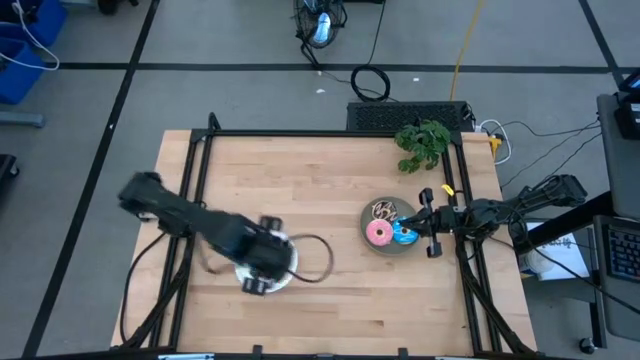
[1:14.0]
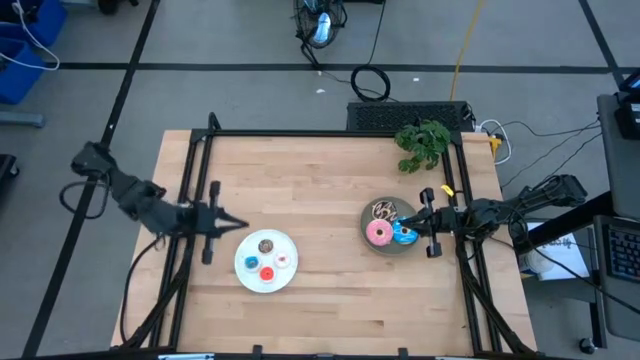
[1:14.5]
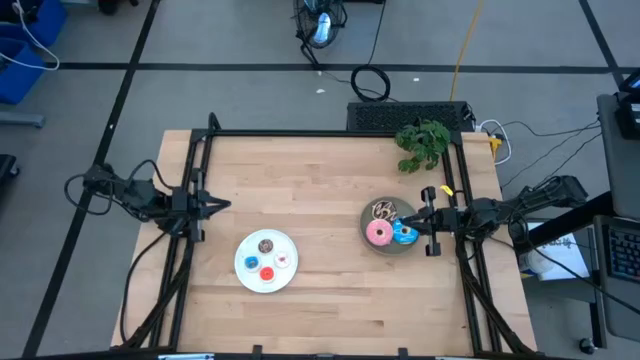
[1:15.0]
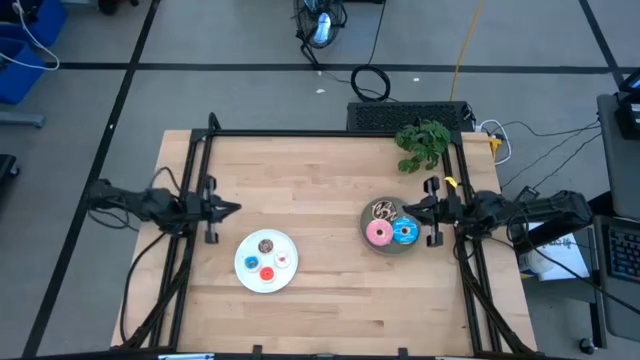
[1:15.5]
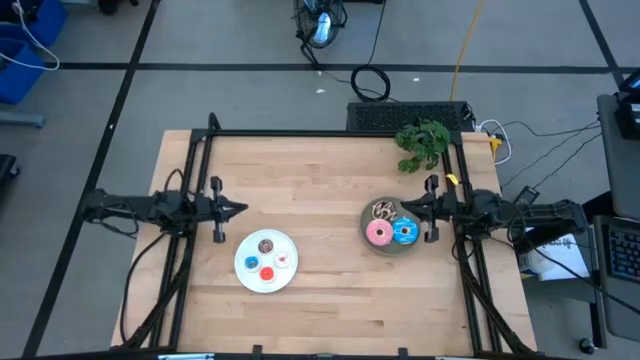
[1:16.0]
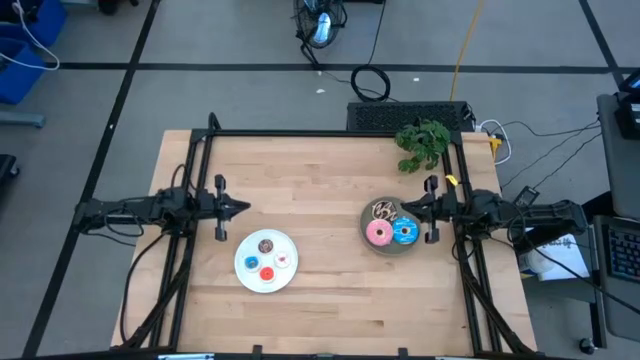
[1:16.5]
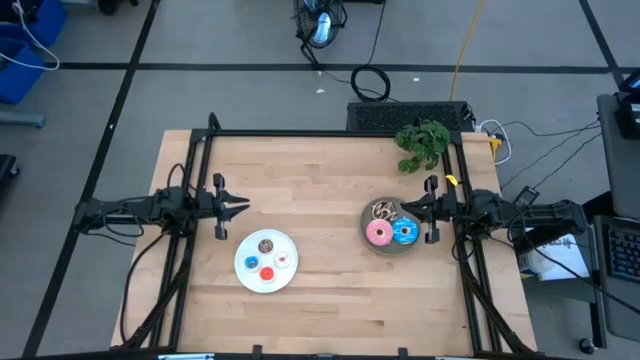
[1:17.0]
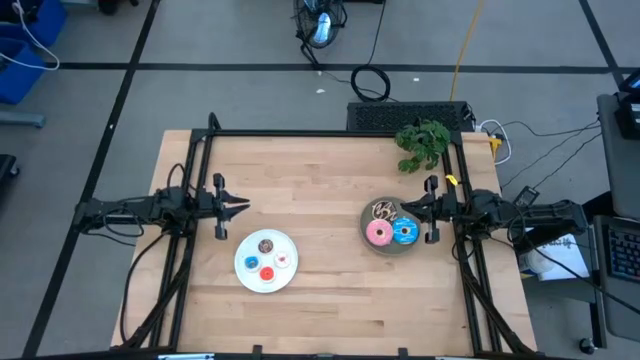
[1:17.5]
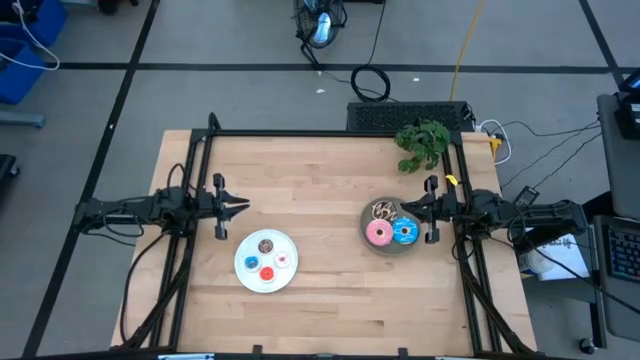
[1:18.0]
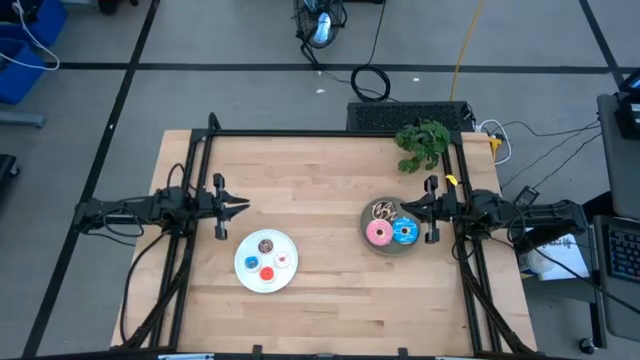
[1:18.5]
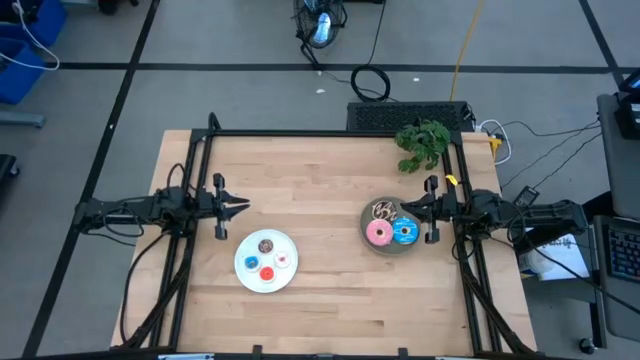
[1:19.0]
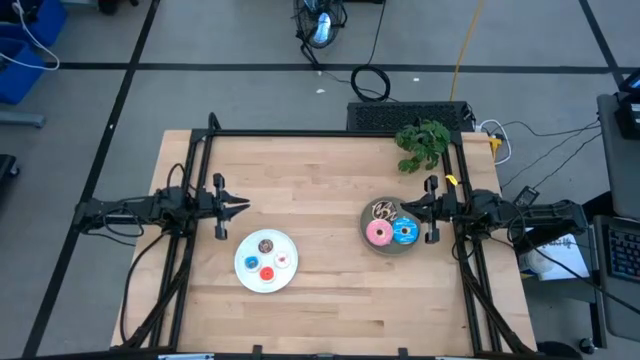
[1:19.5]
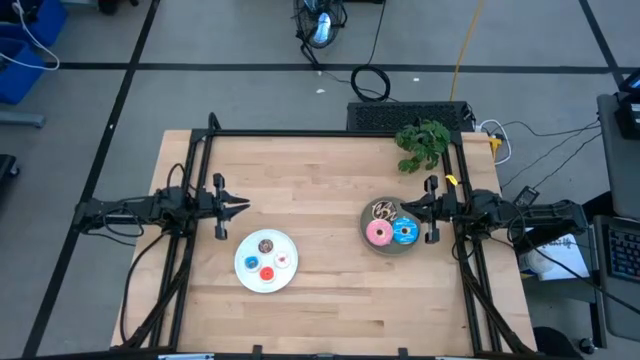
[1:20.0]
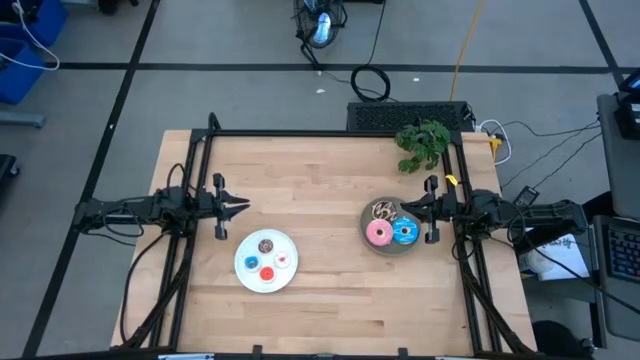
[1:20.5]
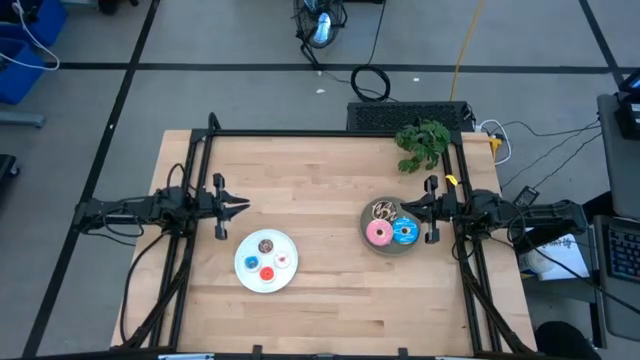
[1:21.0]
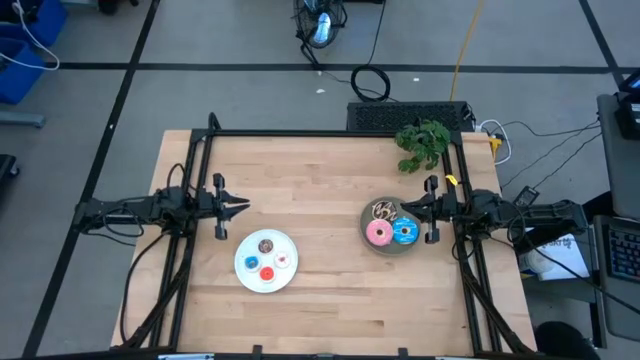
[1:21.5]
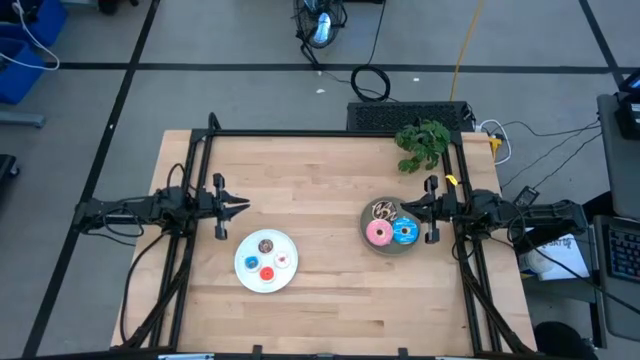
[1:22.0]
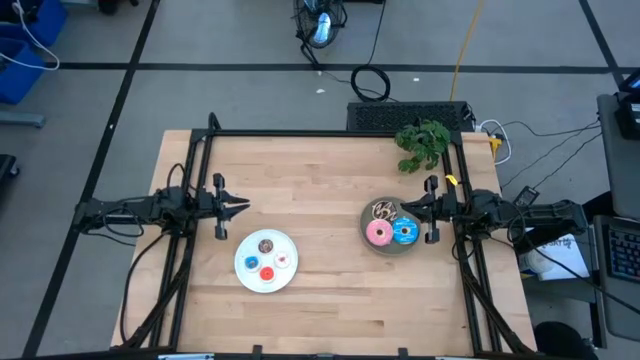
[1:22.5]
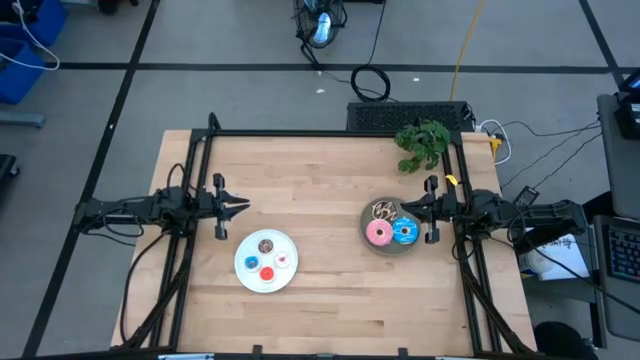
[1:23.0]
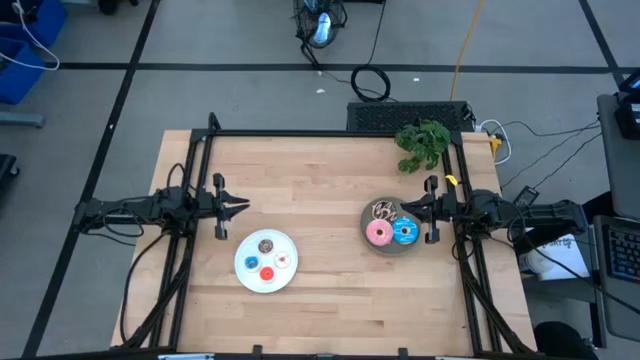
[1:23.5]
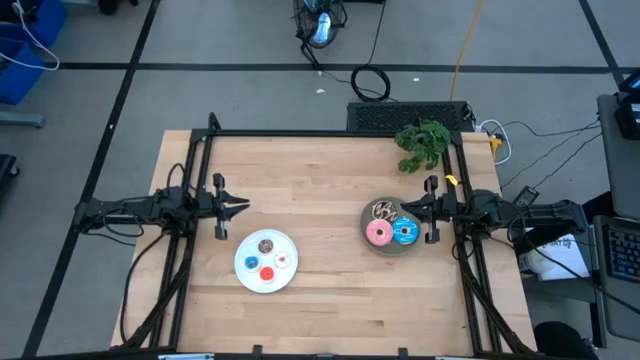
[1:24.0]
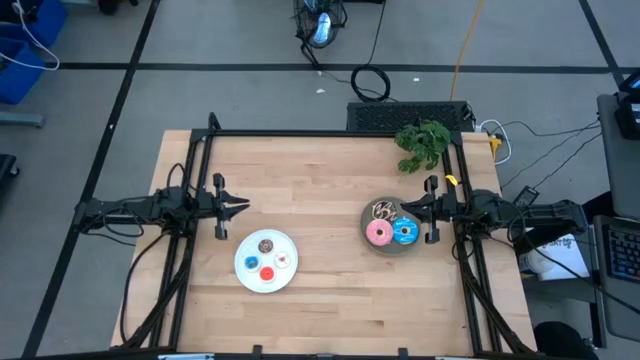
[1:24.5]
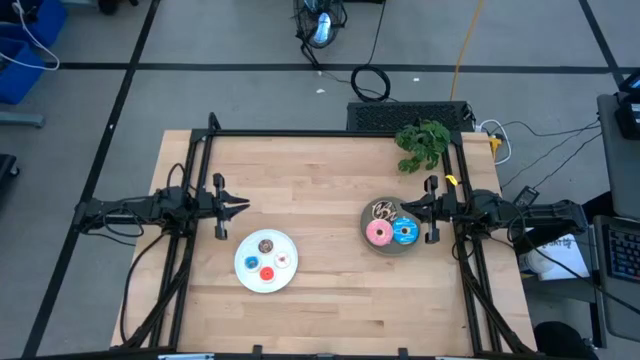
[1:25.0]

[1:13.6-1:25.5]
Task: Pick & Place donuts
Return to Home Position

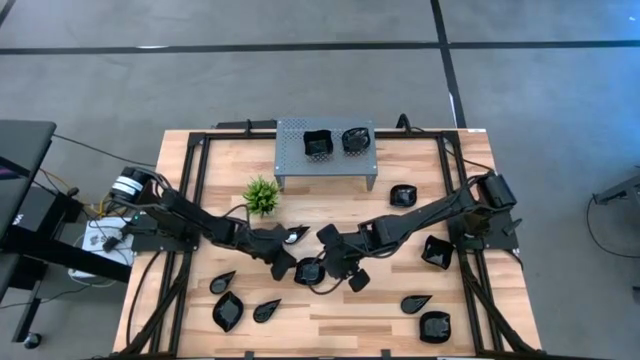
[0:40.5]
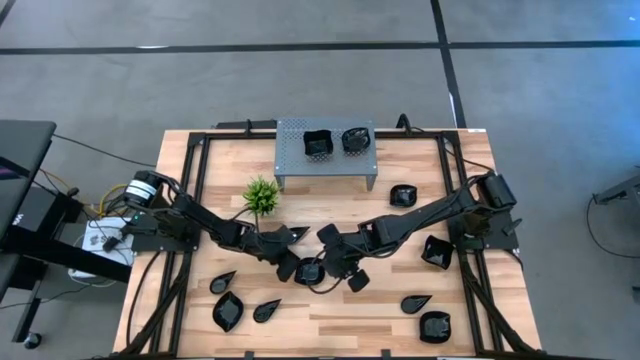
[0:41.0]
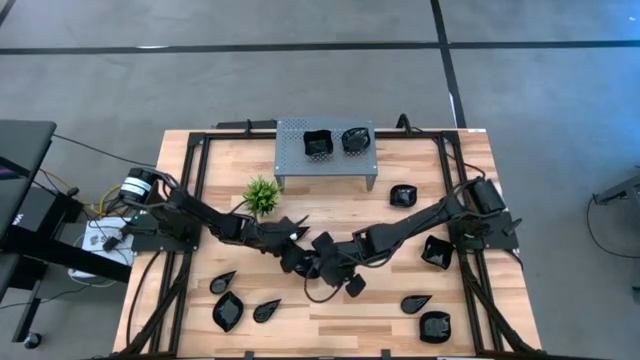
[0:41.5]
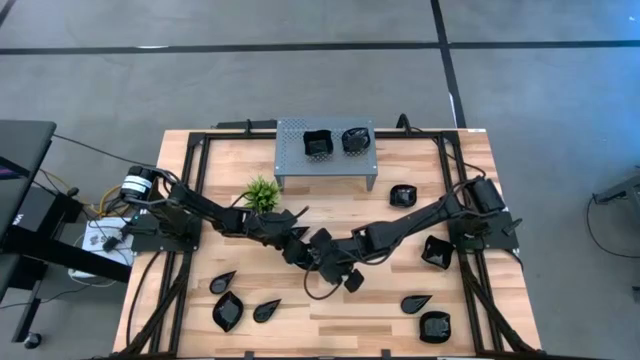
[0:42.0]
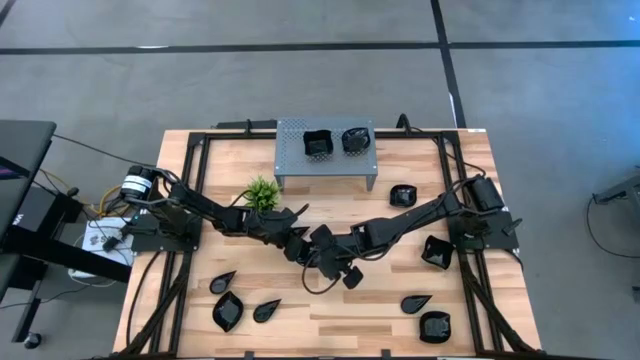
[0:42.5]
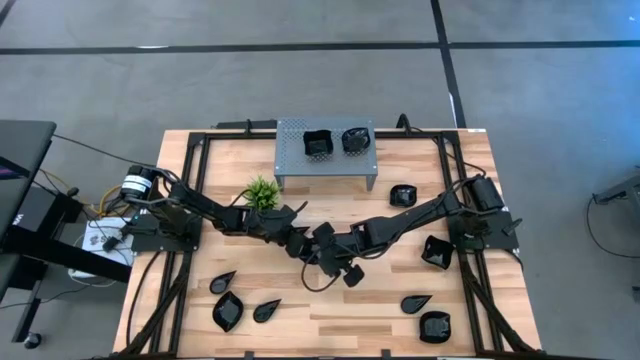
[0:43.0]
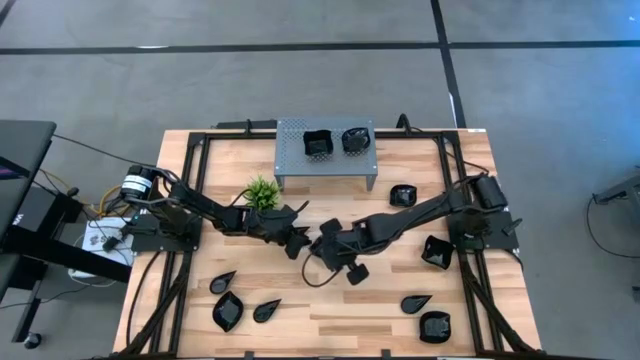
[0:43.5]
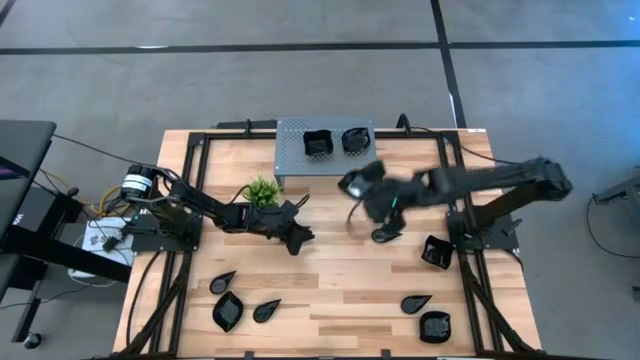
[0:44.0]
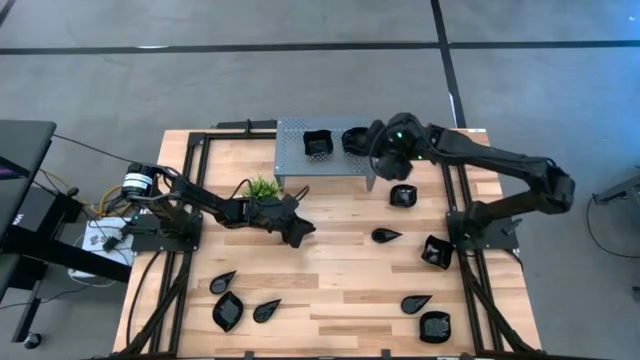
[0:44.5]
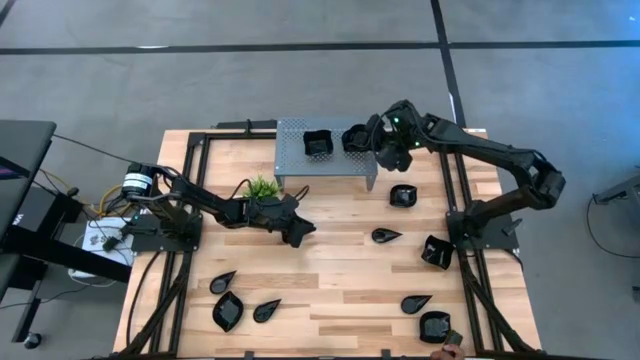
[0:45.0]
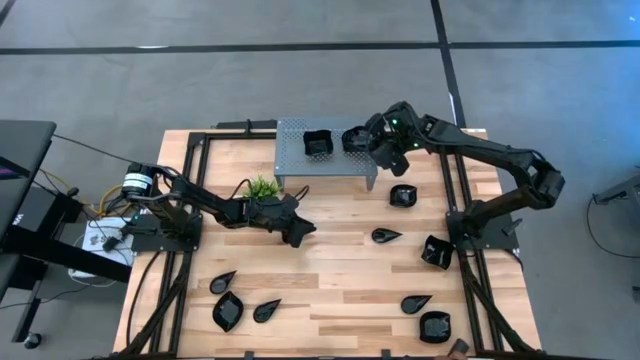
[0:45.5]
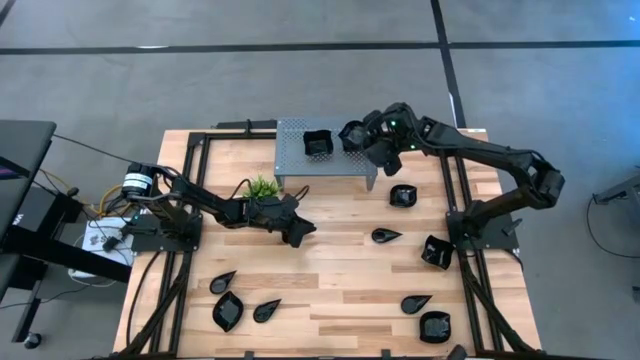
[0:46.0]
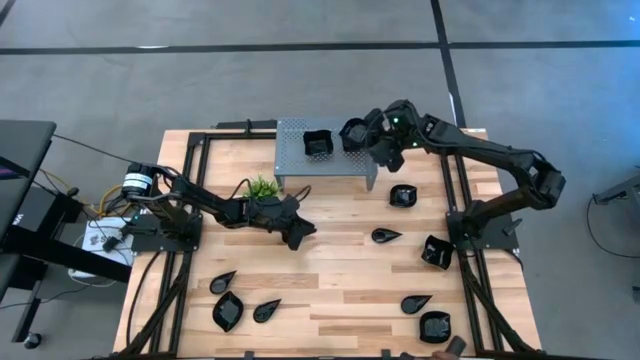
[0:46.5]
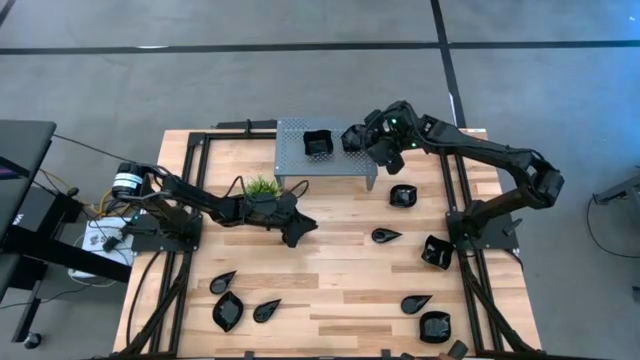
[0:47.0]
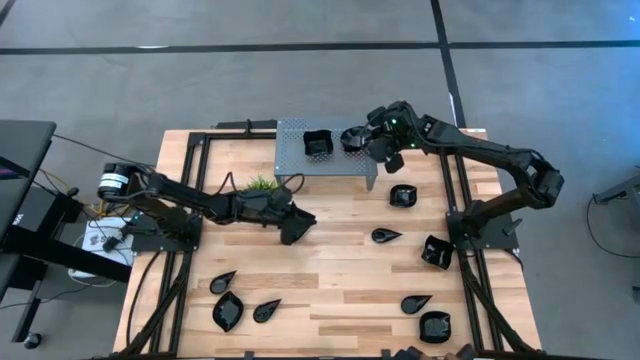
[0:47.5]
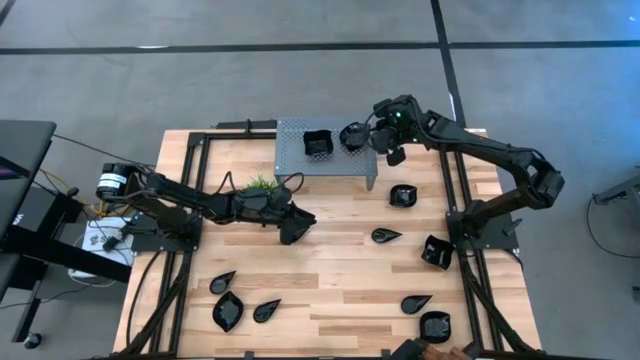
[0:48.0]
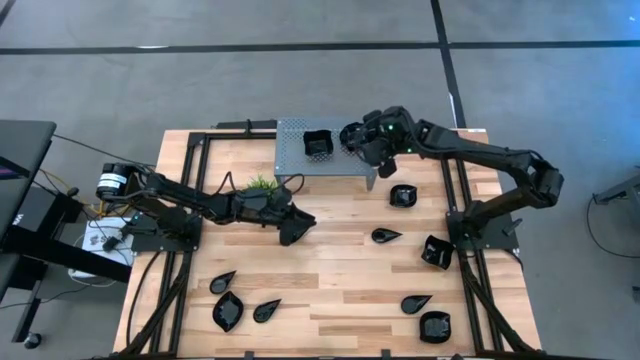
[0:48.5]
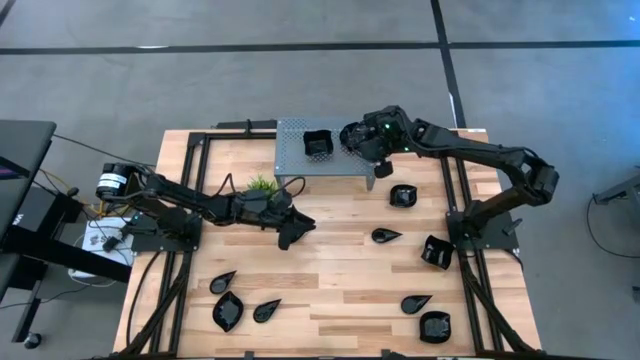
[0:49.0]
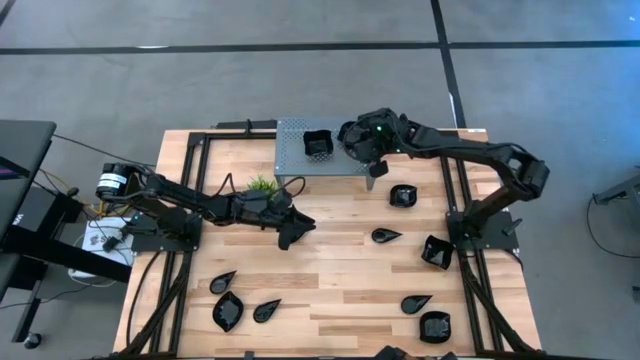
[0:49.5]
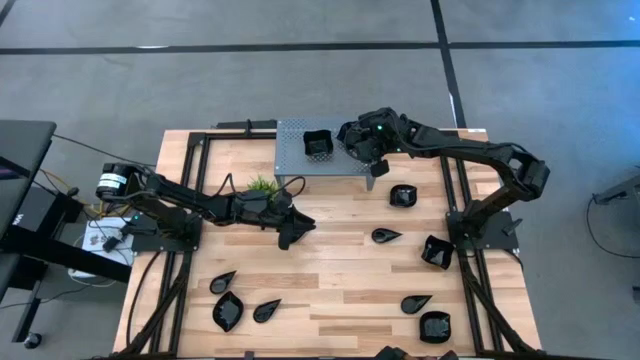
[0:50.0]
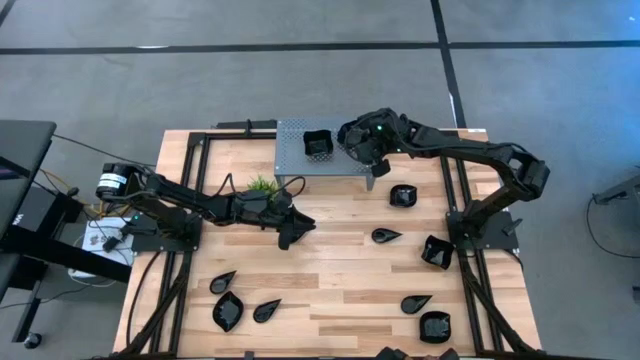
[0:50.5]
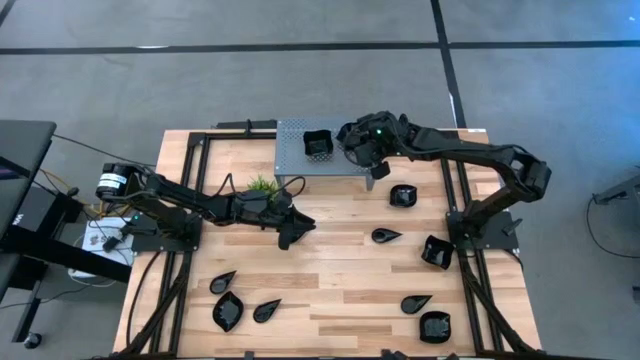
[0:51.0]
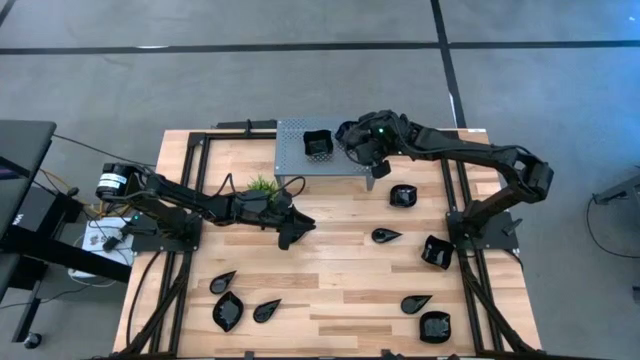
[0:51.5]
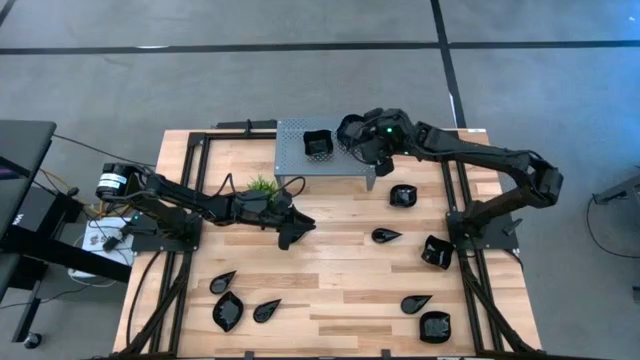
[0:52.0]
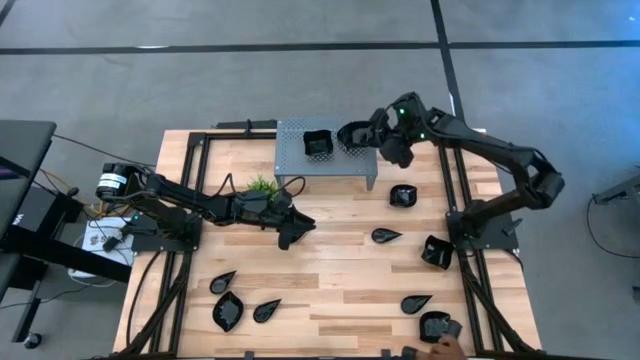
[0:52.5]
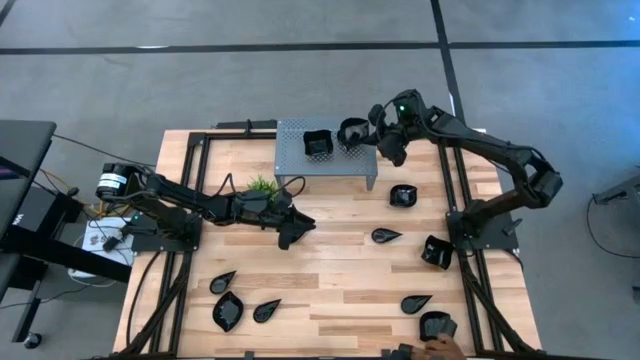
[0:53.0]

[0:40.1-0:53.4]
Task: Pick & Place Mini shaped plates
Stack the black leaf-shaped plate on top of the black leaf-shaped plate on the shelf
